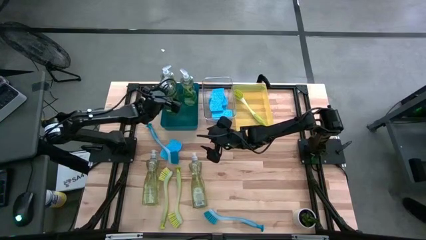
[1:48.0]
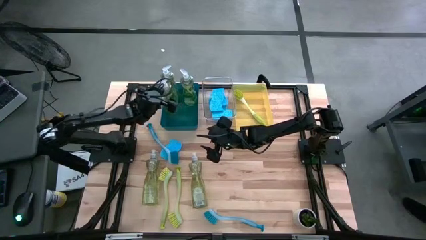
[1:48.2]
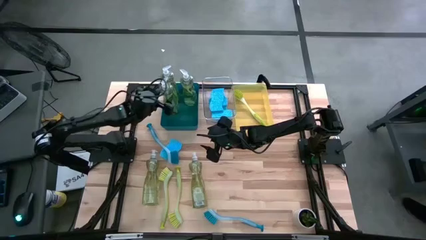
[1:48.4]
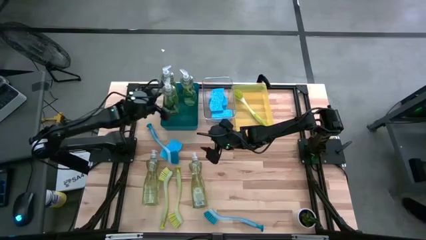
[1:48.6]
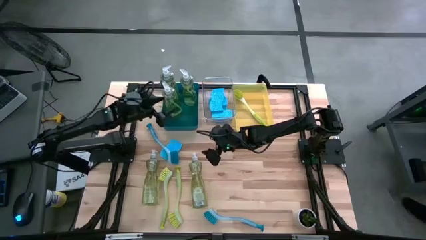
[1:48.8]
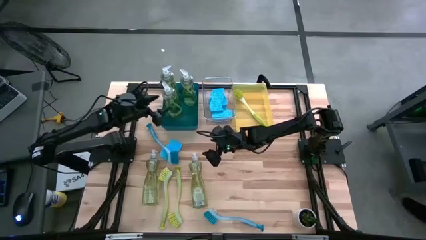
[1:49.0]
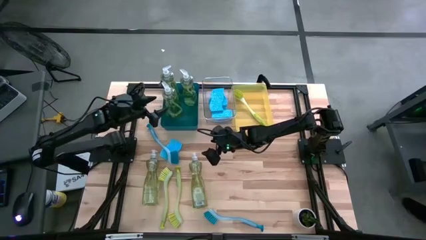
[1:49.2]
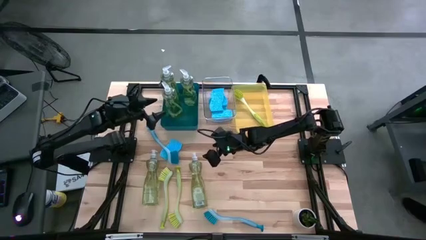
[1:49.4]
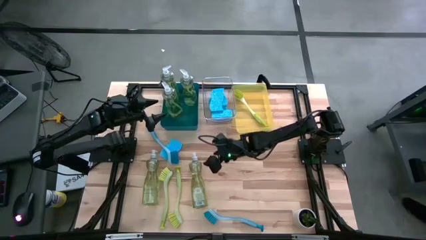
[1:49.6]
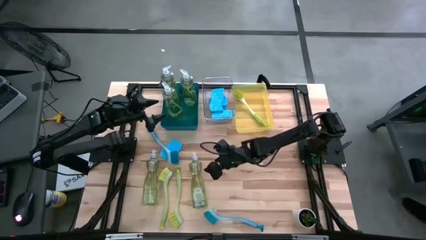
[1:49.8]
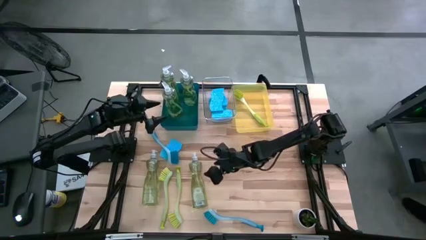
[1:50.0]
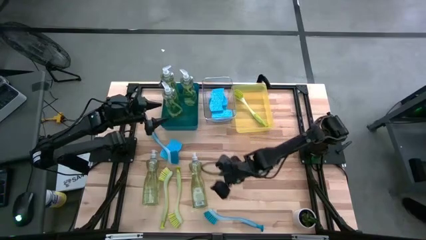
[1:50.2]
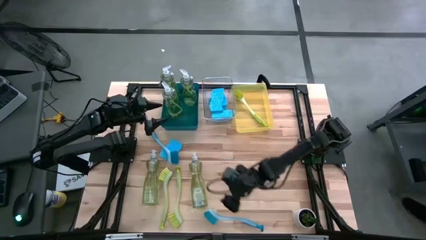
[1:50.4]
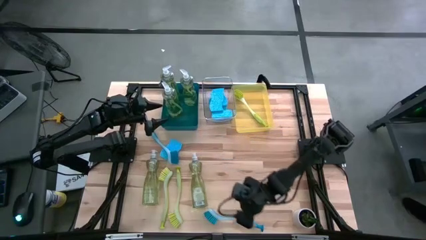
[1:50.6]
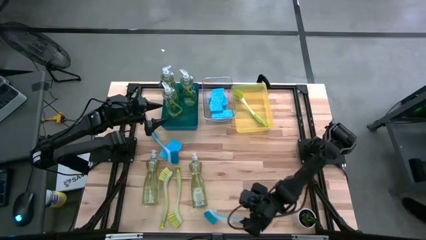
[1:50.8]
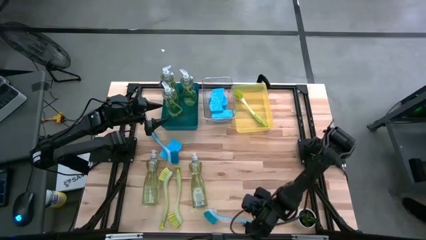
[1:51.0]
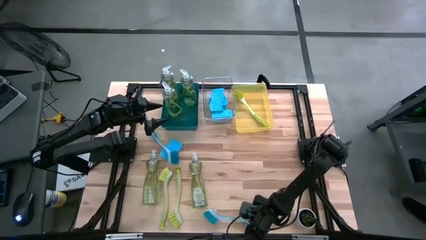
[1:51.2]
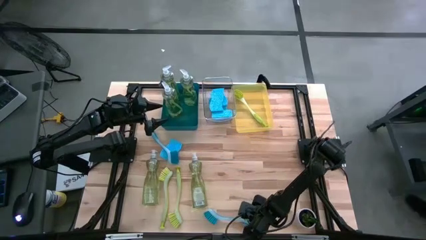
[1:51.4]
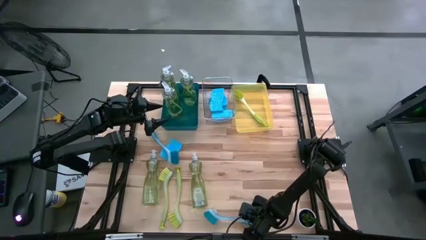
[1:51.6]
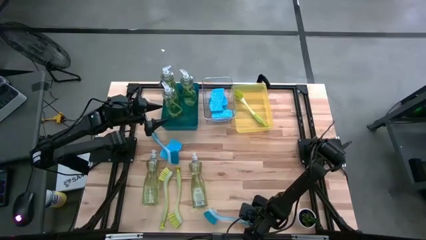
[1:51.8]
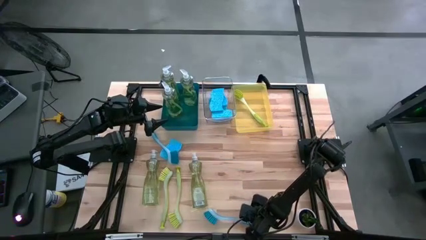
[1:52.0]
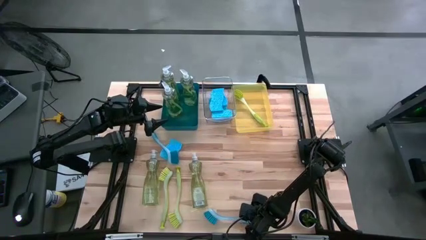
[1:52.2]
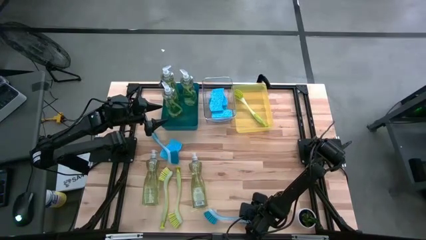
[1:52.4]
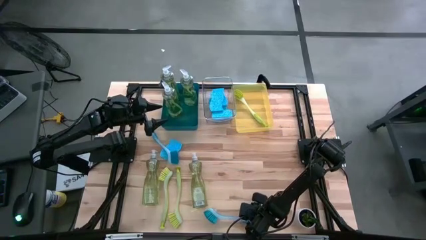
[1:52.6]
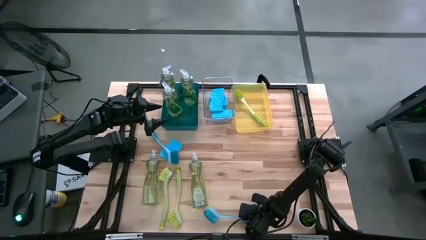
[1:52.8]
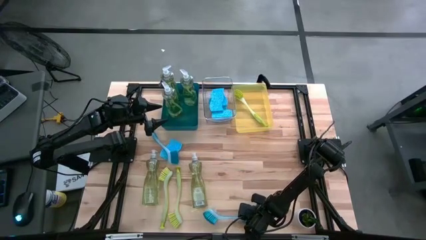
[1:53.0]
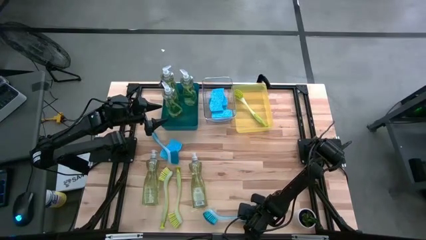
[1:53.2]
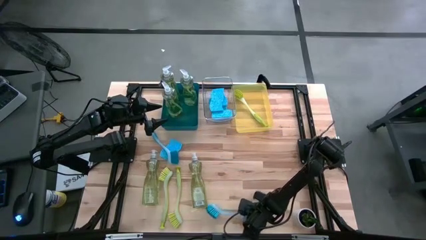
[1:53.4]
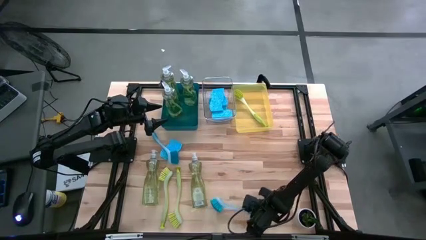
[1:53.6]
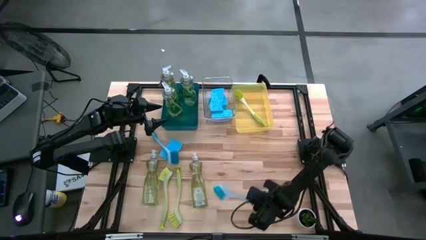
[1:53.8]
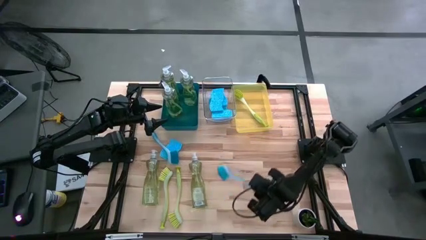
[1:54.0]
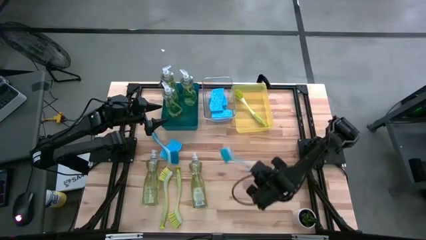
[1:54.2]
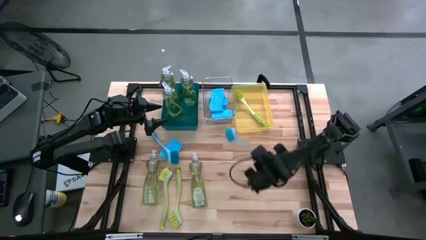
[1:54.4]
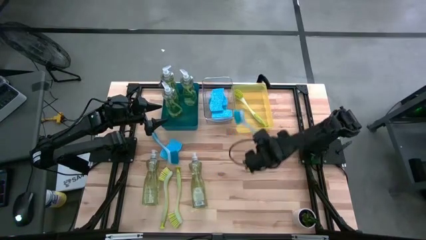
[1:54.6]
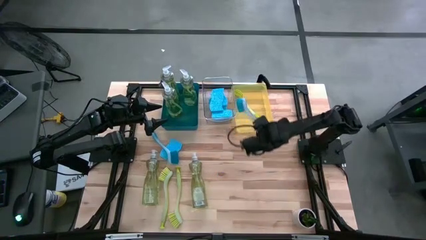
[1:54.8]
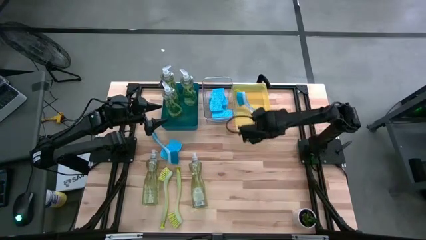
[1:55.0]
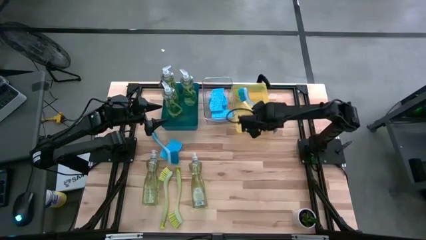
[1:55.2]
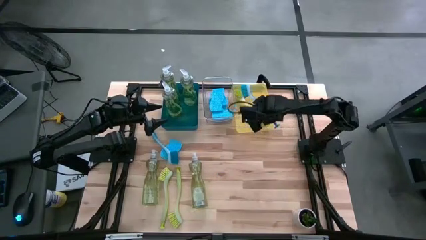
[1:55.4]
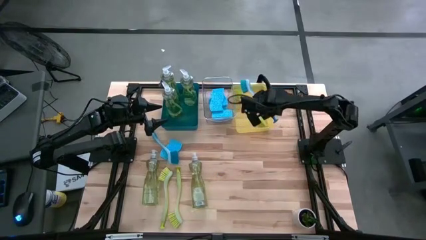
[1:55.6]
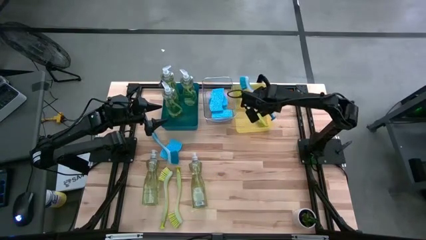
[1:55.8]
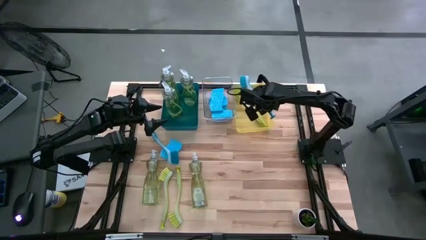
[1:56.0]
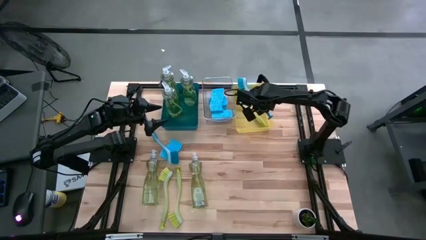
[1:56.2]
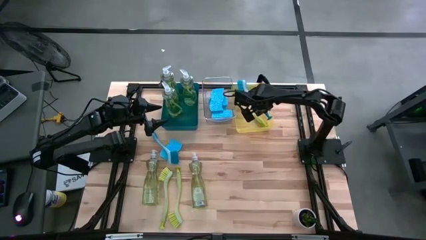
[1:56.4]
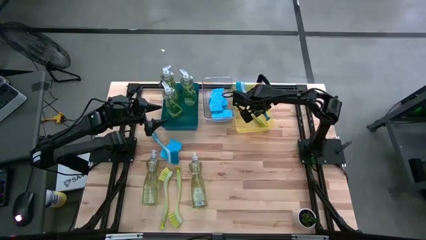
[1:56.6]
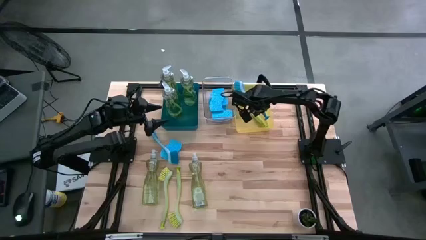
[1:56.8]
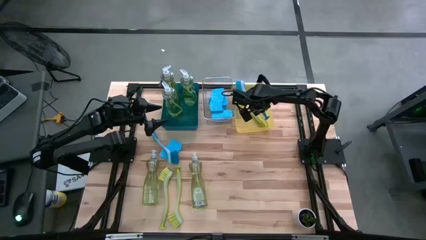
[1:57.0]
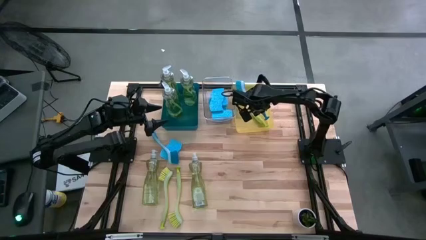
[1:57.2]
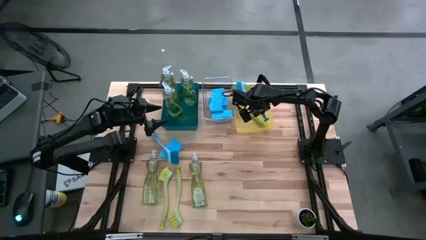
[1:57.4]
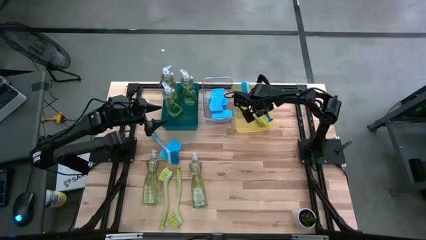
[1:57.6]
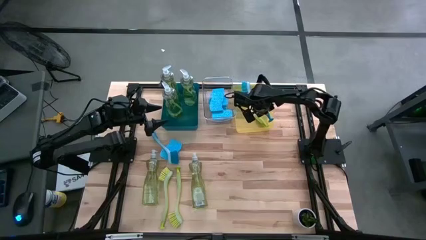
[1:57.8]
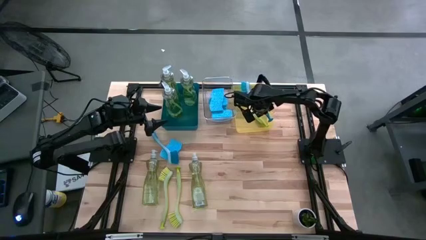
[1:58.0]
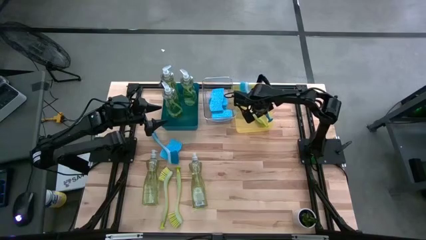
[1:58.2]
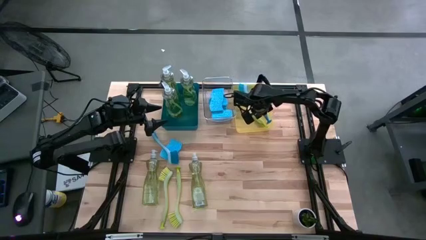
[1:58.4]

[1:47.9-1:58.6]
Task: Pick & Place Kitchen Sink Supplies
Put the blue dish brush into the yellow bin

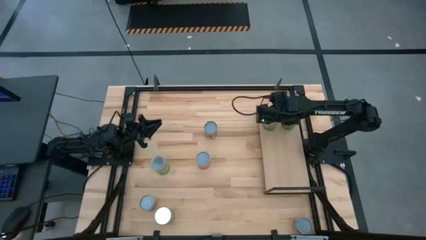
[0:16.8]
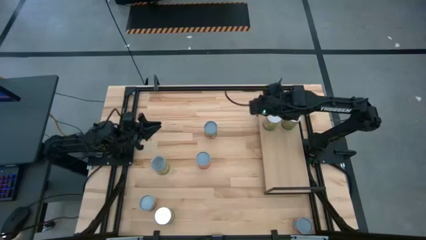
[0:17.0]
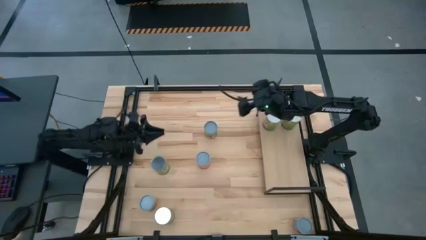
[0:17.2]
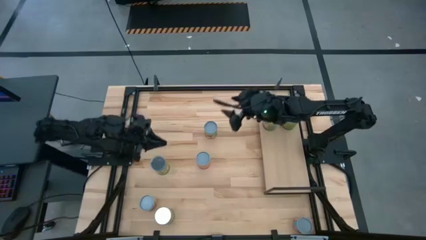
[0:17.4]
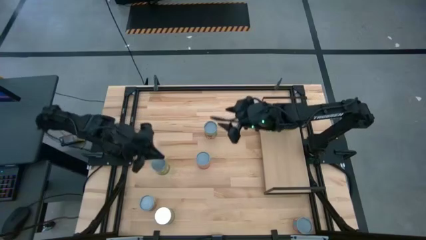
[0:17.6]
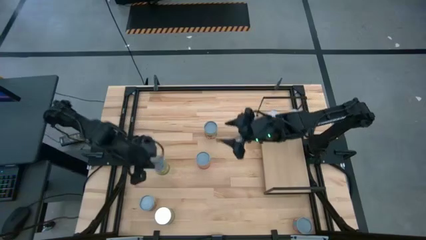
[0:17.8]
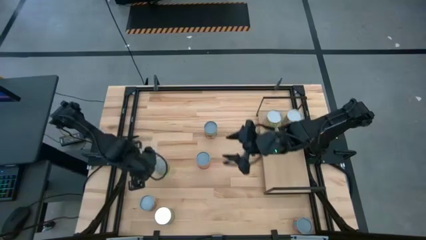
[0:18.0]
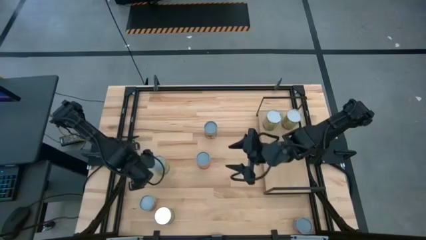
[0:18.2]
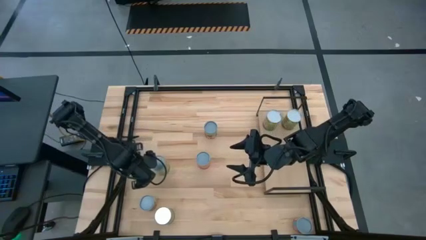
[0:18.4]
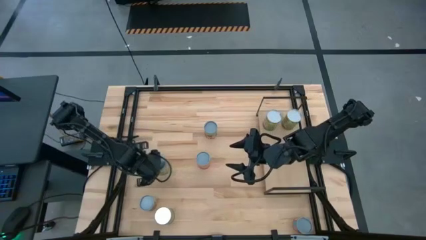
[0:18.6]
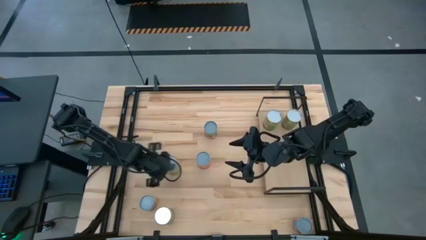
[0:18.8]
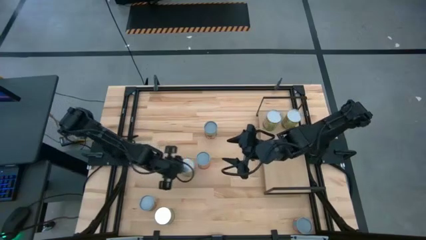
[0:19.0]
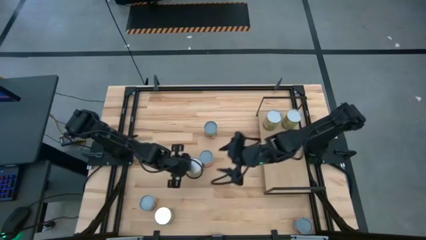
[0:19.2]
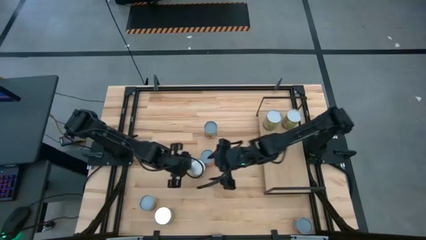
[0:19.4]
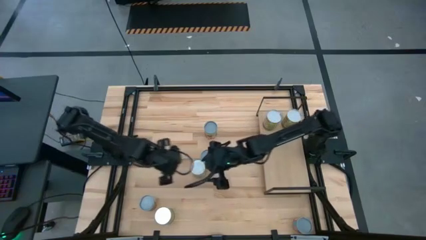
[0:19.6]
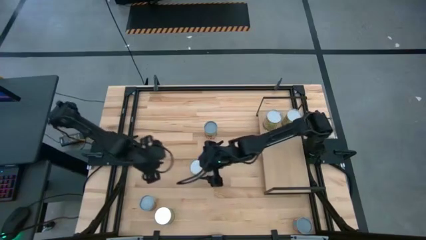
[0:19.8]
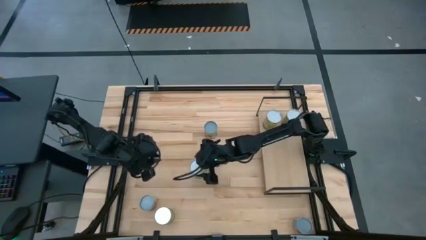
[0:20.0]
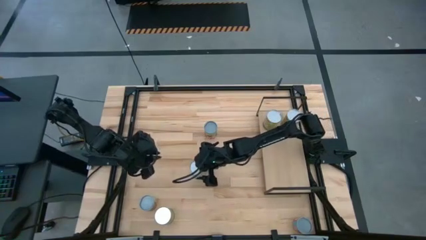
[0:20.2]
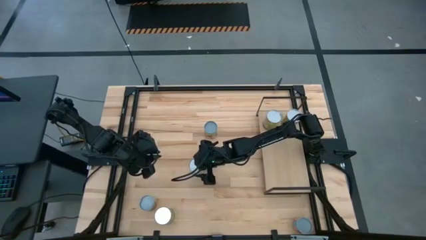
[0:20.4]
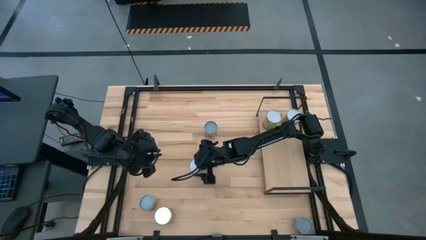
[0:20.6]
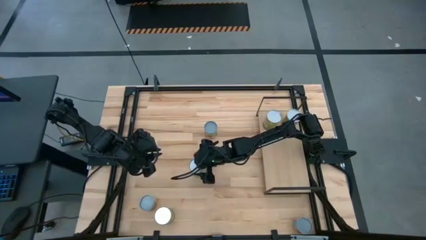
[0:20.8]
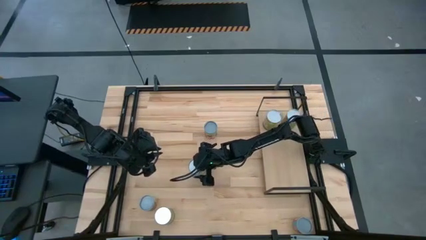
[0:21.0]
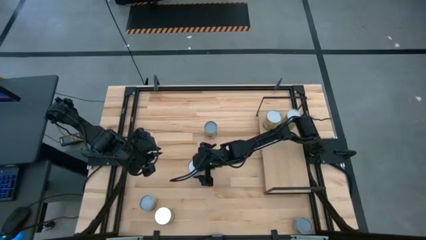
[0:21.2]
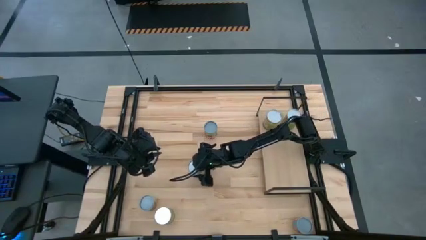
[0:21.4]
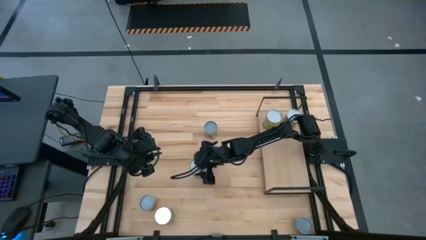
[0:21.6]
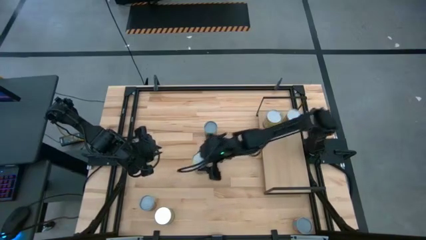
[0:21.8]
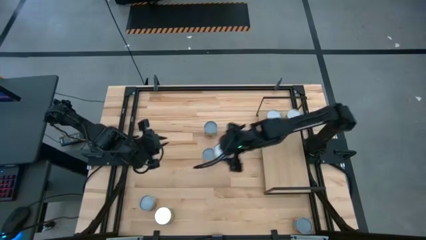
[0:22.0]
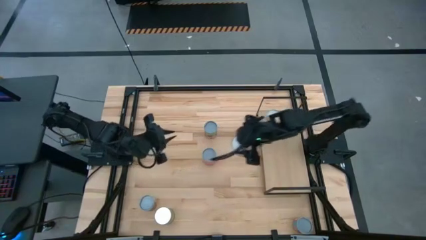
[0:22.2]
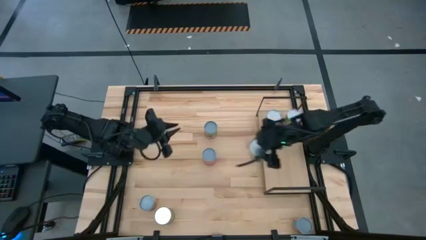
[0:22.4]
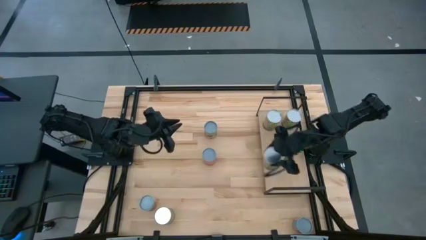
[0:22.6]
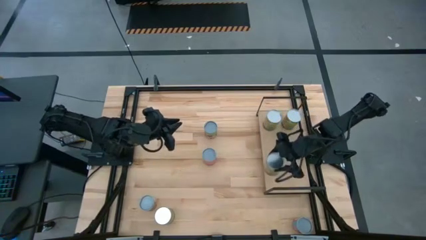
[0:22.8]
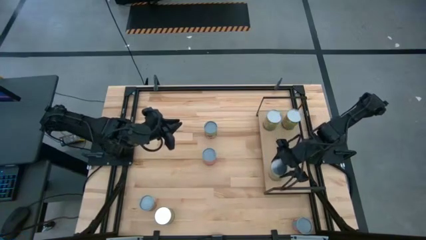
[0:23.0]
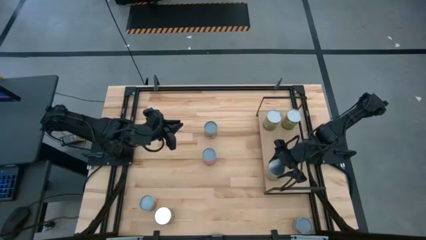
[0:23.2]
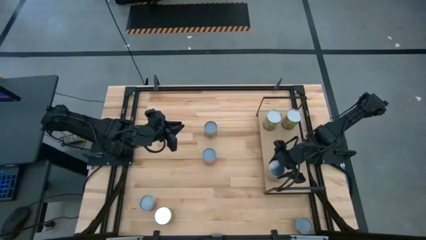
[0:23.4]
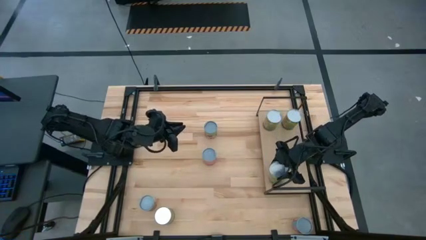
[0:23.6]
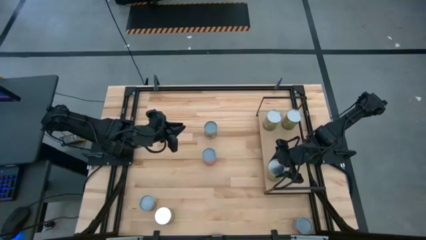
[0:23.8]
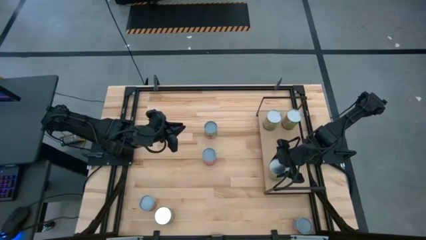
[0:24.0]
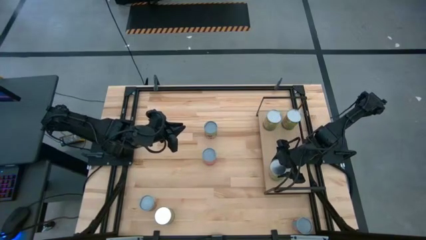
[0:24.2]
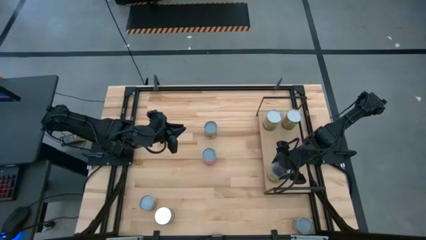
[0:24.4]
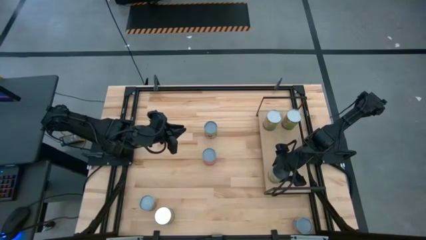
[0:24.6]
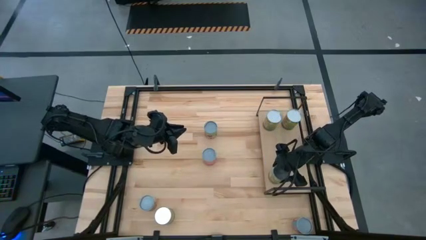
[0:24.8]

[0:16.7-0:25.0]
Task: Pick and place cans onto a shelf
Put the top canned peas on the shelf
